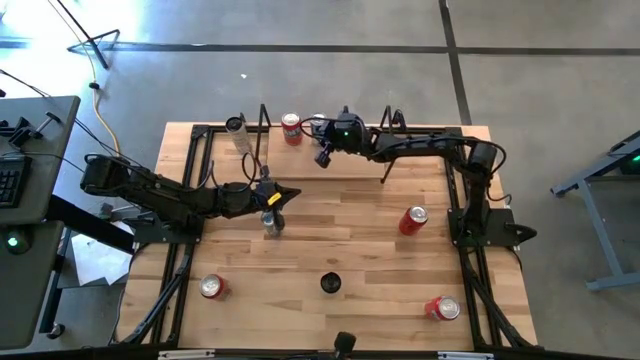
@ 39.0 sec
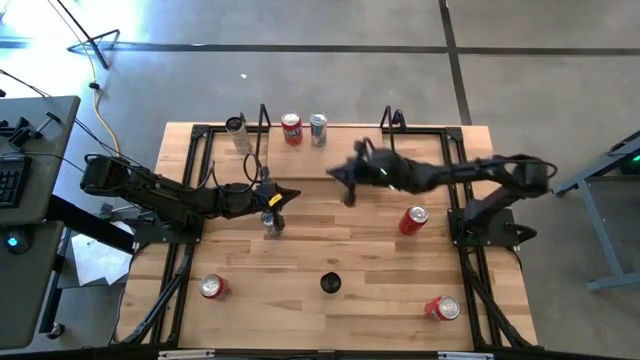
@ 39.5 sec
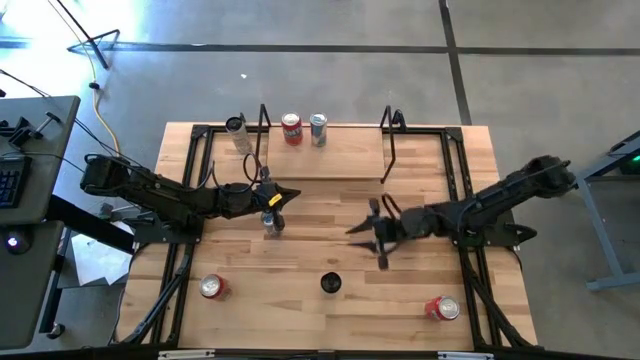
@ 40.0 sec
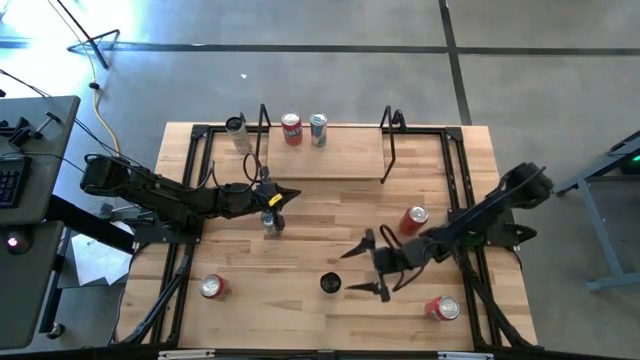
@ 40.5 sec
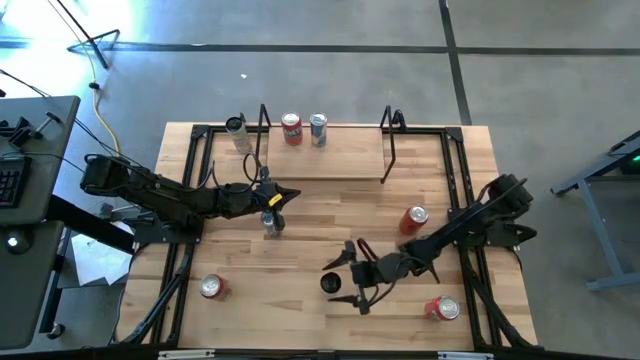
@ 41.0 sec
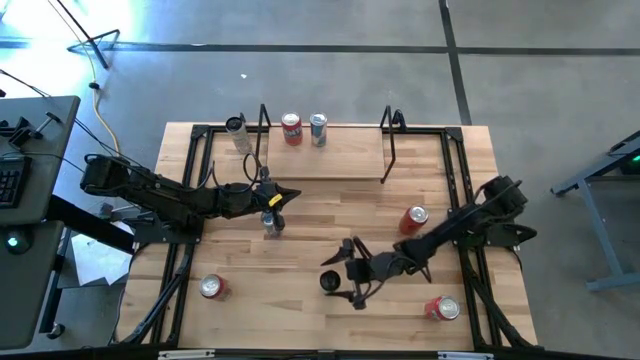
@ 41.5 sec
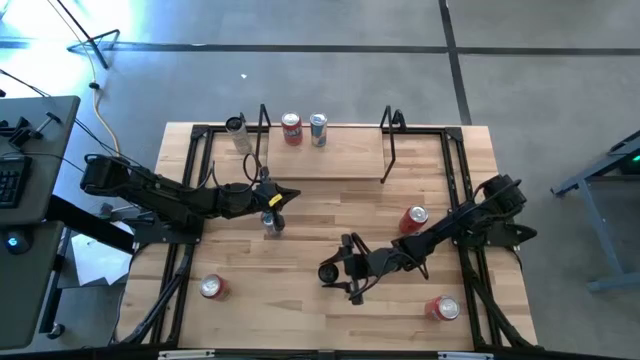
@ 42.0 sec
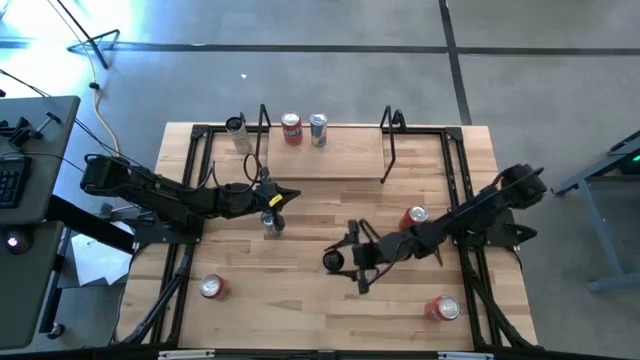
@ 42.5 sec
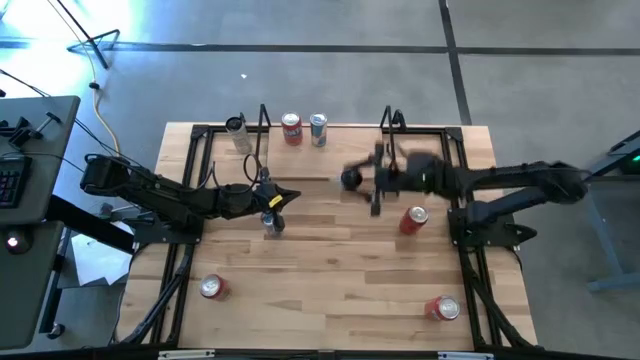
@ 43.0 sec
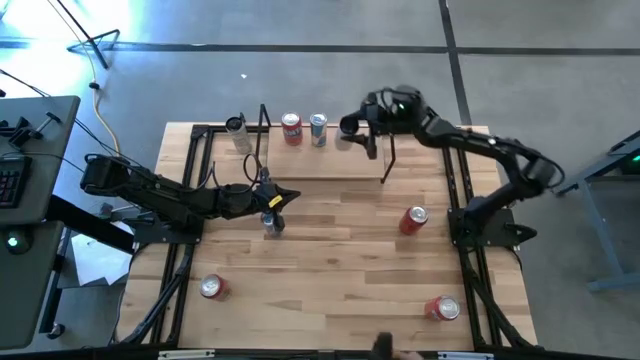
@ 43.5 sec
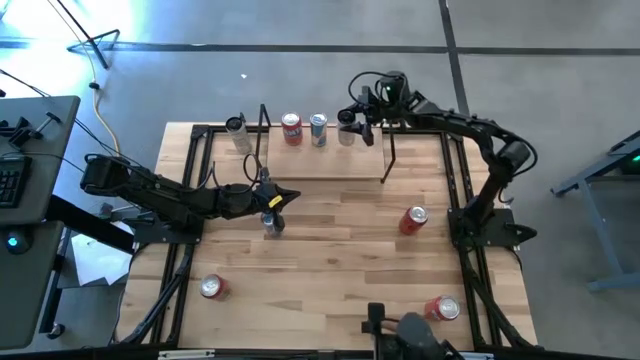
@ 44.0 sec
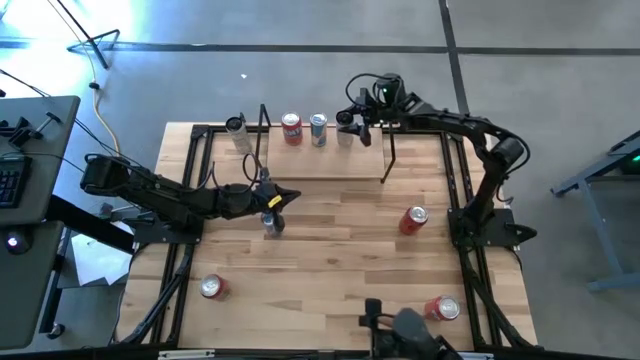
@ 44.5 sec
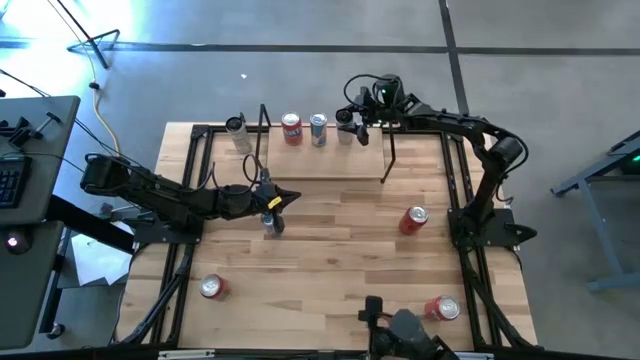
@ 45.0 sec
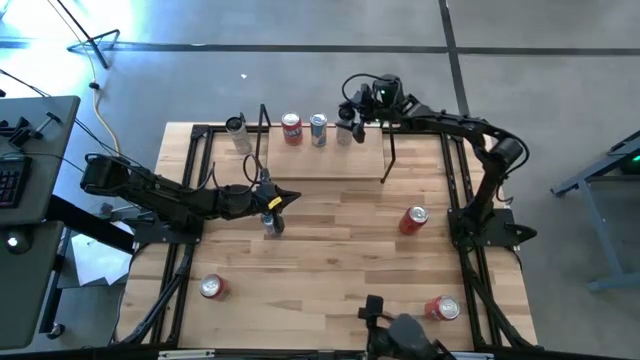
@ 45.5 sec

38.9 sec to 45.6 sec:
Task: Place canned beverage on shelf
Put the bottom white yellow soda can on the shelf

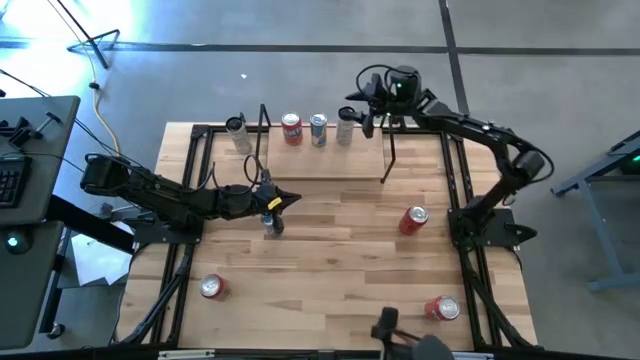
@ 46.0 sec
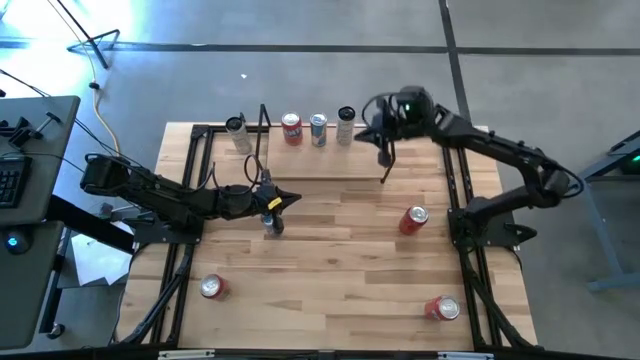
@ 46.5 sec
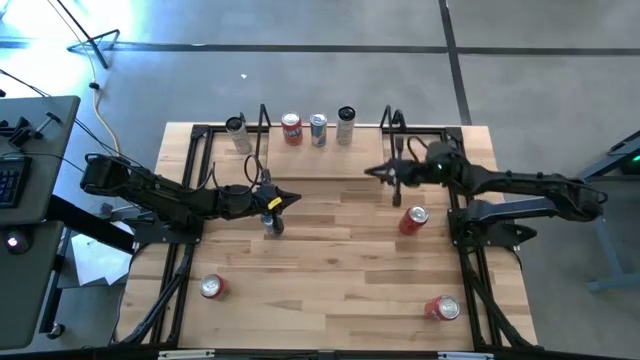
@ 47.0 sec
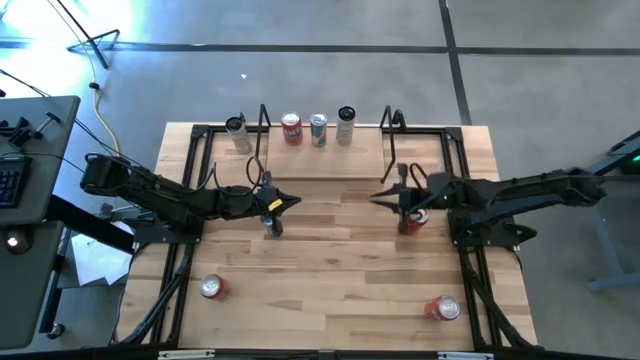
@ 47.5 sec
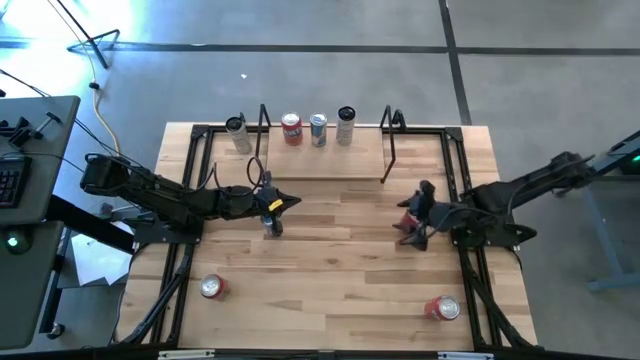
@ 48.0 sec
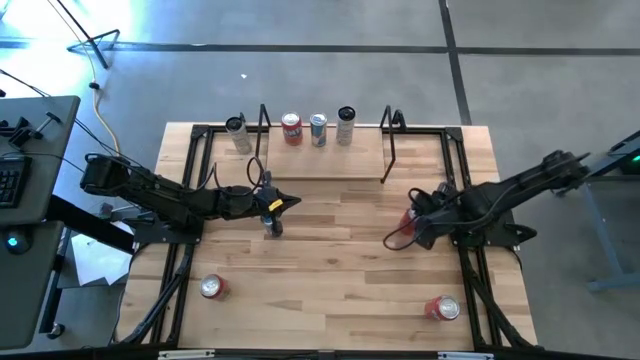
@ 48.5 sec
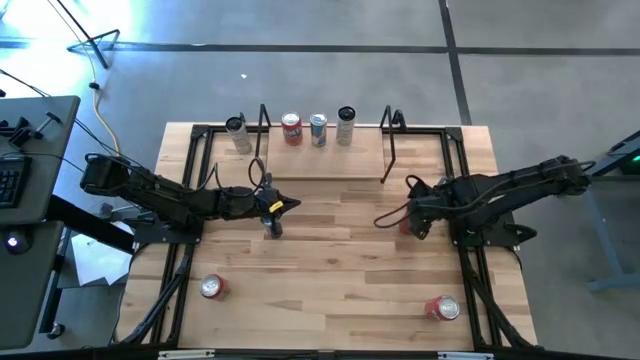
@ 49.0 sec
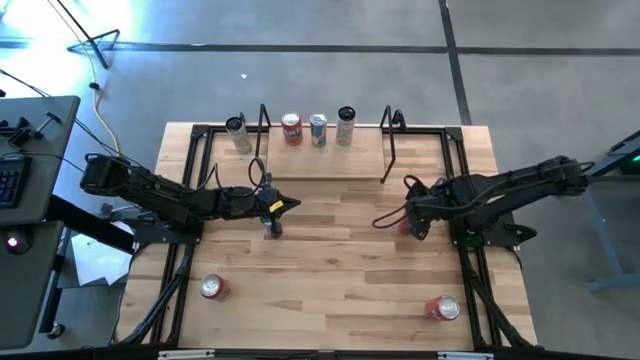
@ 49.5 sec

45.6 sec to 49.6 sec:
Put the top red black soda can on the shelf

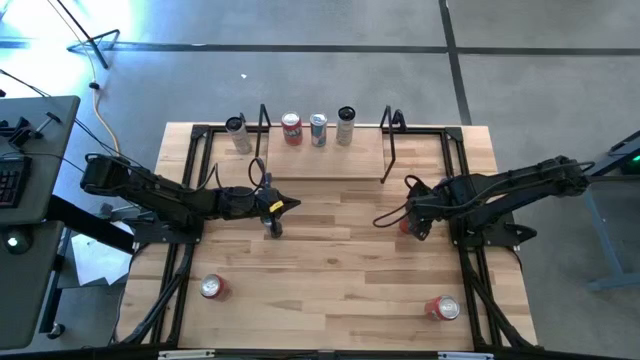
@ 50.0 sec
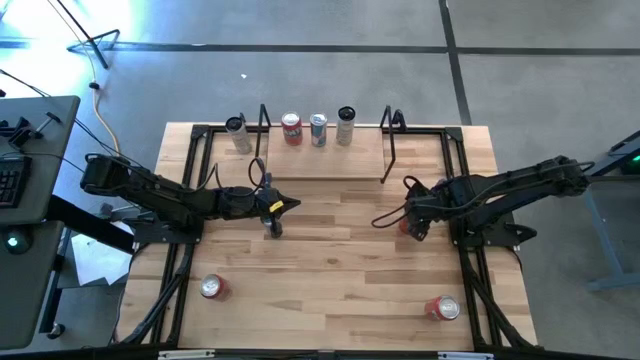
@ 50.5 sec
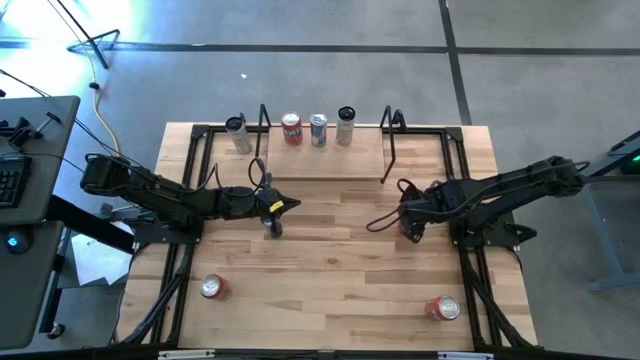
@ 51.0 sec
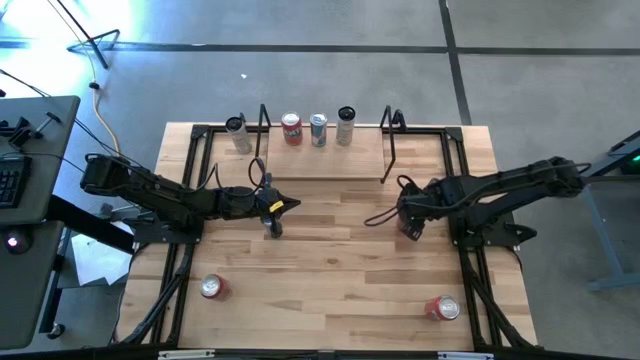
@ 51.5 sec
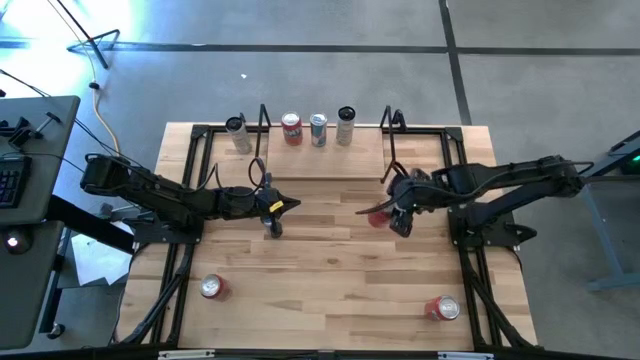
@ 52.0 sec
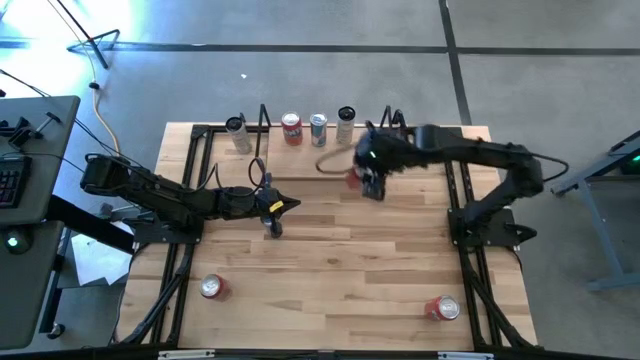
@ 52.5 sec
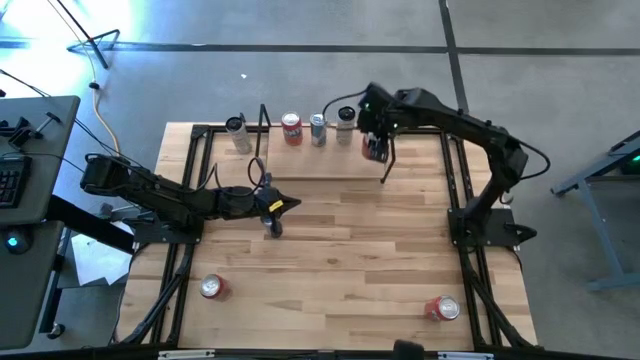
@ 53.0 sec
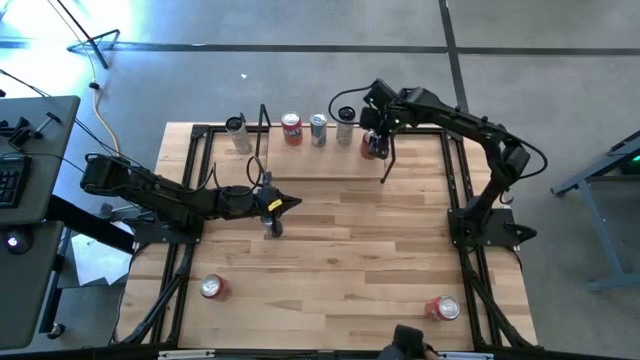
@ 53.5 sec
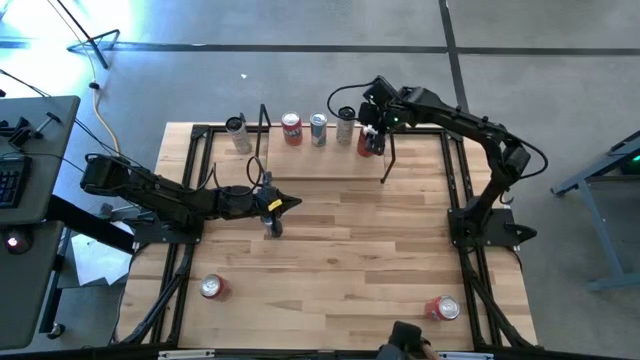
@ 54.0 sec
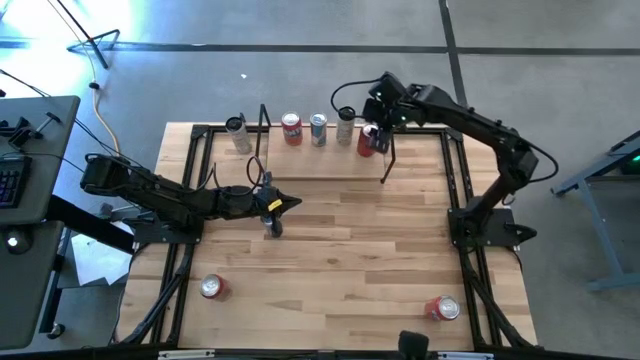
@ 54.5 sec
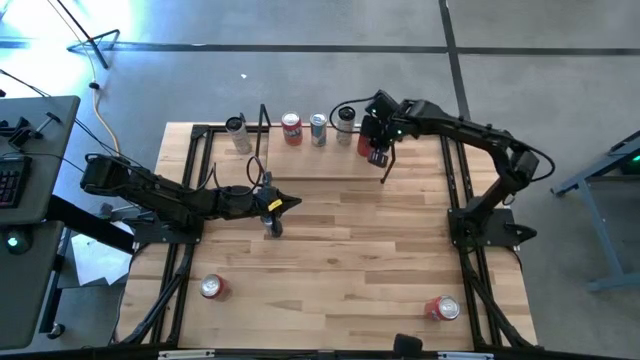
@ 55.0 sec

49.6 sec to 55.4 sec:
Put the top red black soda can on the shelf
